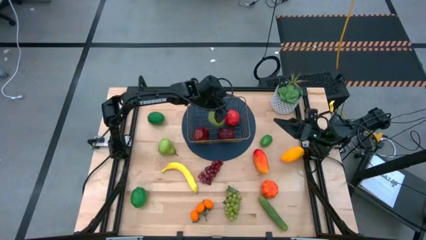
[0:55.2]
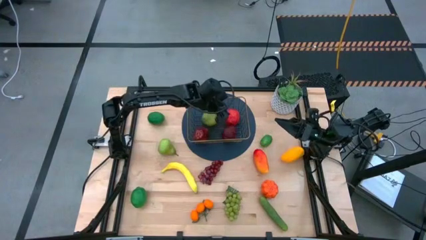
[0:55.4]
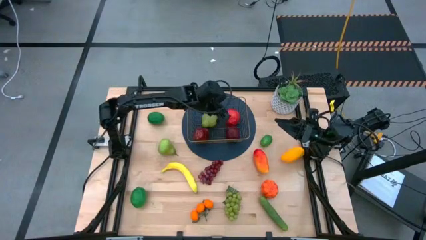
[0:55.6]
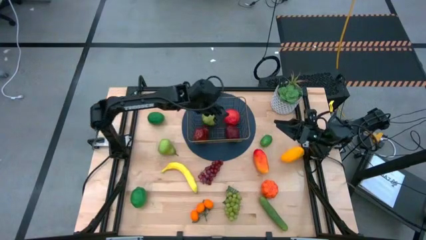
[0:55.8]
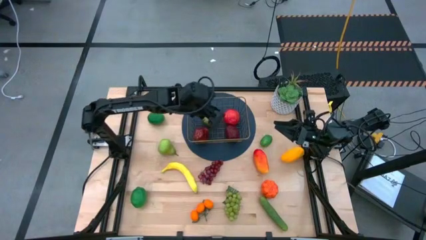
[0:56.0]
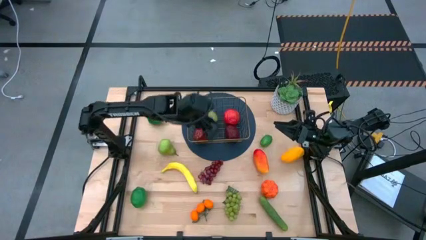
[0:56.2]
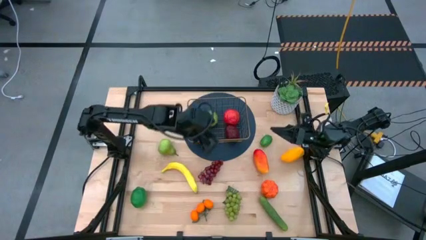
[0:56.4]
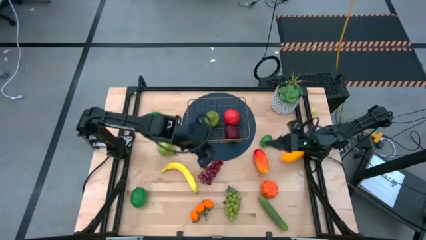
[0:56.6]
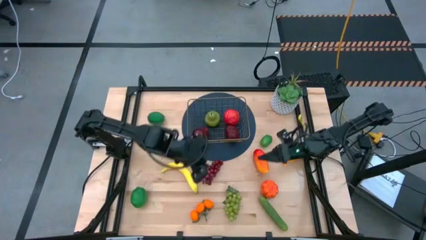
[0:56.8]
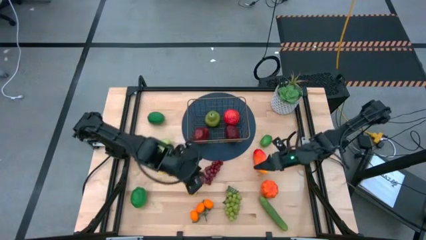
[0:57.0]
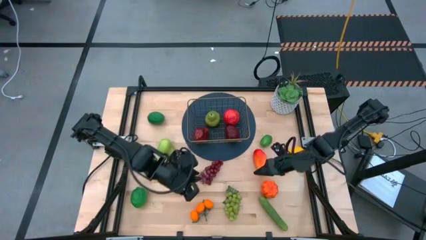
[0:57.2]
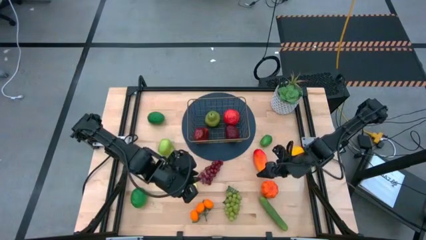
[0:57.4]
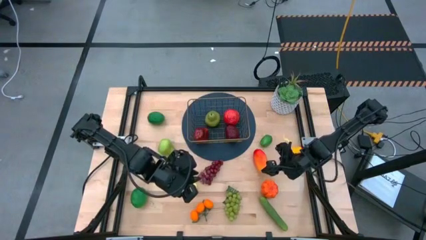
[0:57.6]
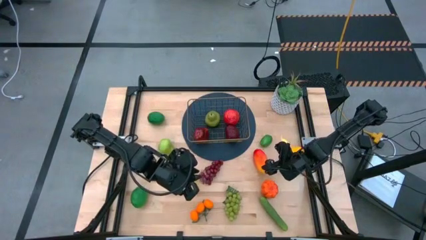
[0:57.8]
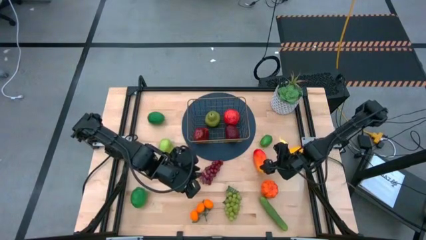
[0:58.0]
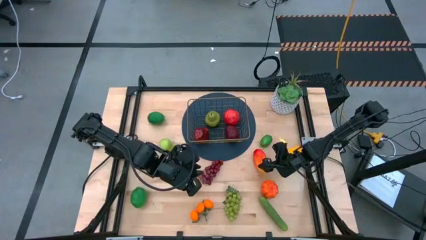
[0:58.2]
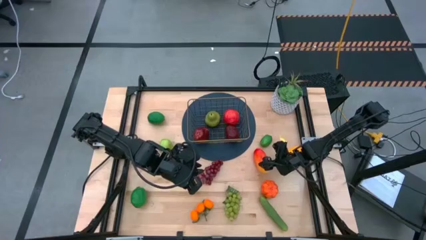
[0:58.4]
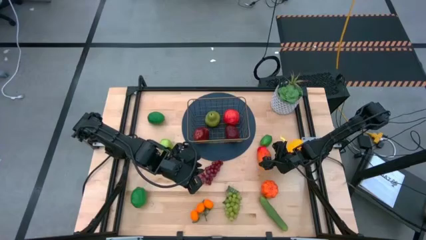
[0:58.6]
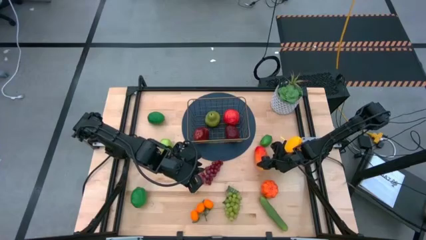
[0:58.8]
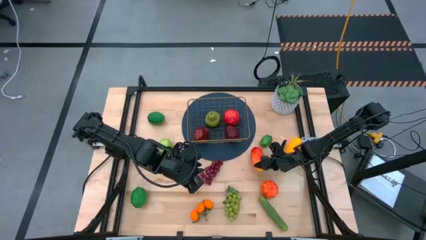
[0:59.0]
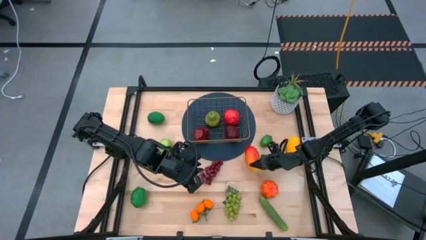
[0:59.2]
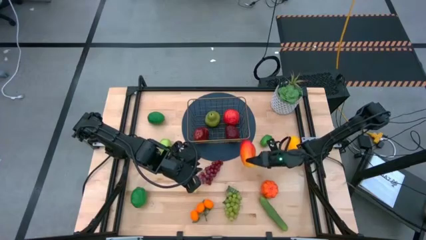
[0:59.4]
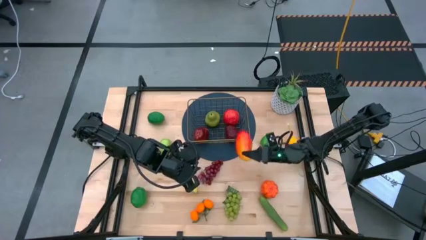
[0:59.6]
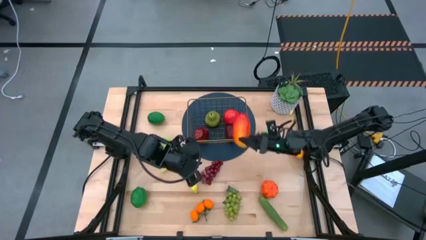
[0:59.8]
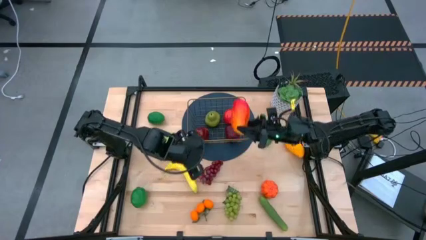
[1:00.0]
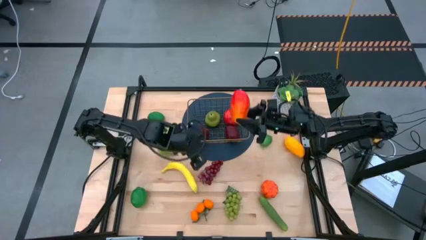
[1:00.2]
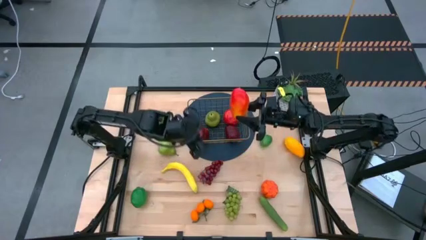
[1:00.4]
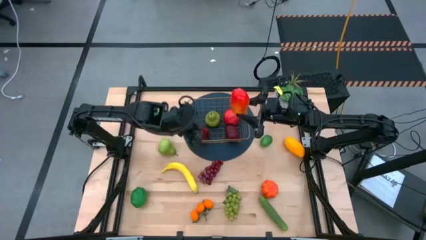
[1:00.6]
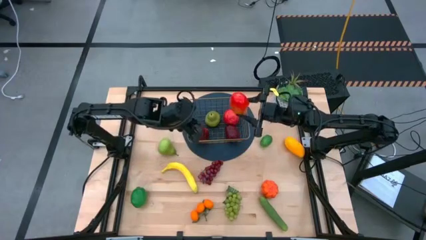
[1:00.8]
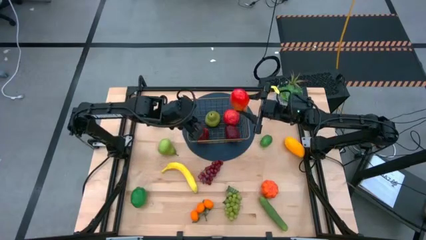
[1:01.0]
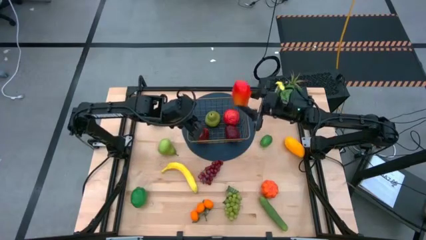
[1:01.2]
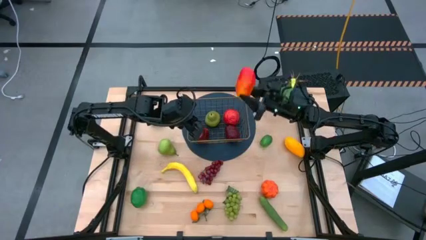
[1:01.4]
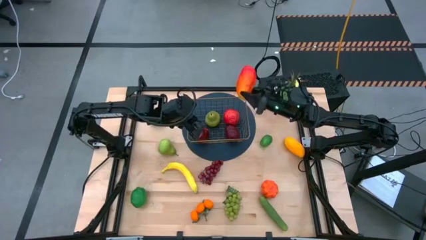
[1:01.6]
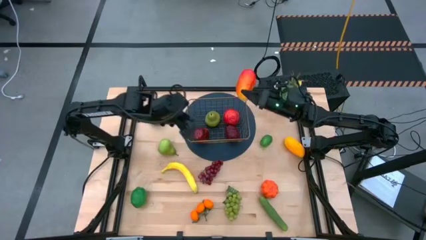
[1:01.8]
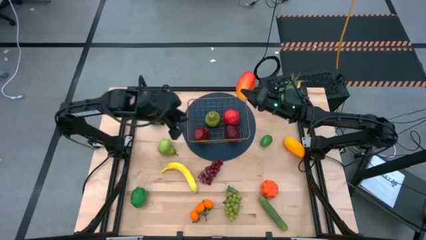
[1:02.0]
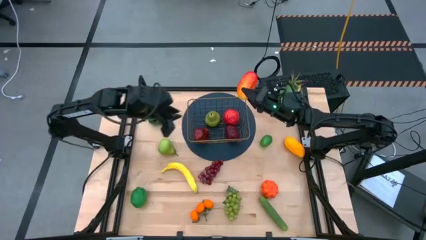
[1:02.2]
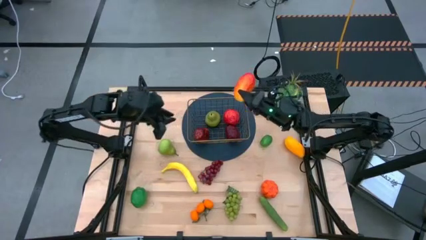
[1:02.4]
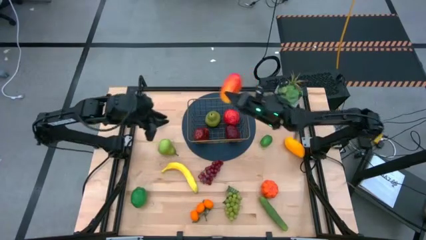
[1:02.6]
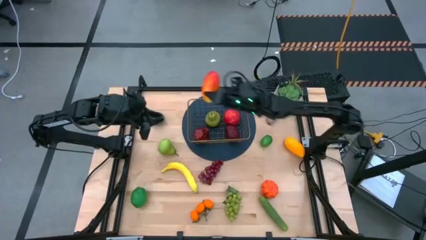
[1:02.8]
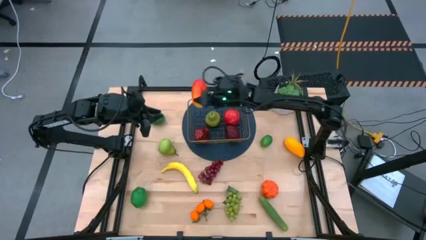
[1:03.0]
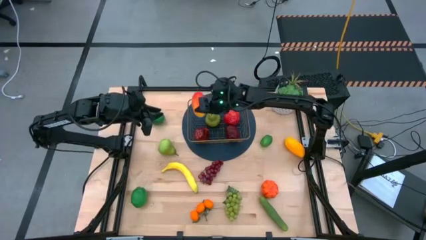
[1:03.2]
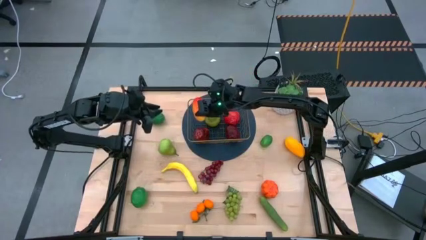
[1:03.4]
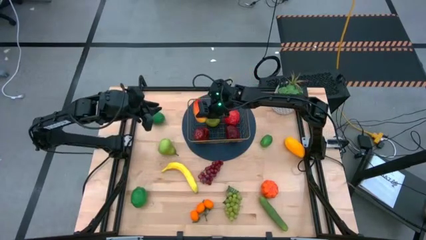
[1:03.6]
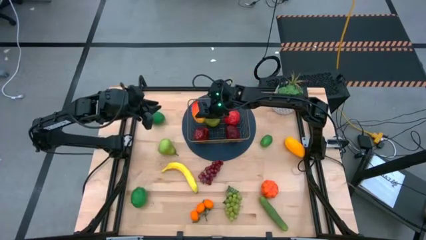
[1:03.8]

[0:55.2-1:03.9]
Task: Build produce basket
Put the orange mango into the wire basket

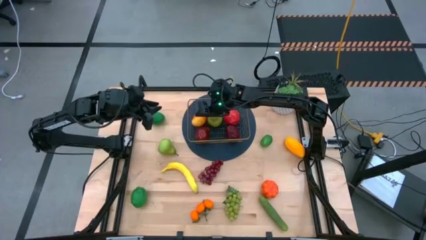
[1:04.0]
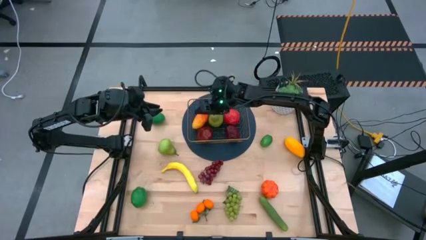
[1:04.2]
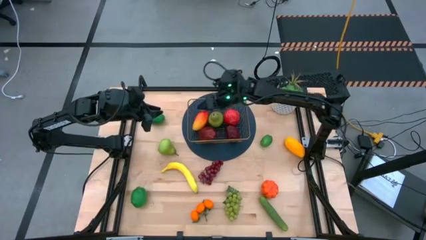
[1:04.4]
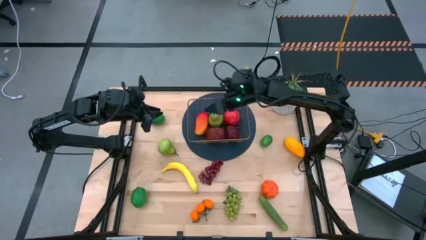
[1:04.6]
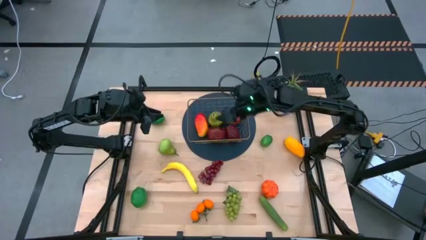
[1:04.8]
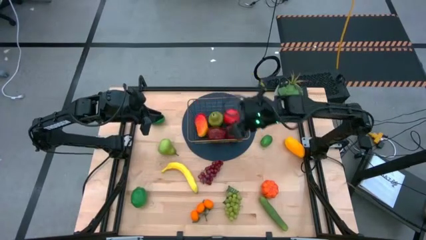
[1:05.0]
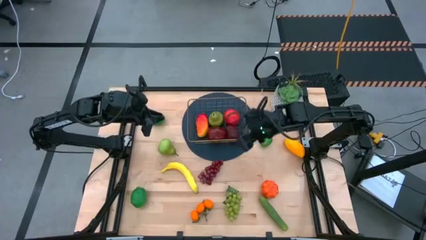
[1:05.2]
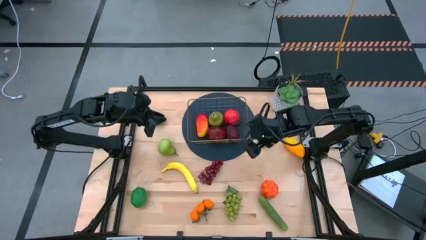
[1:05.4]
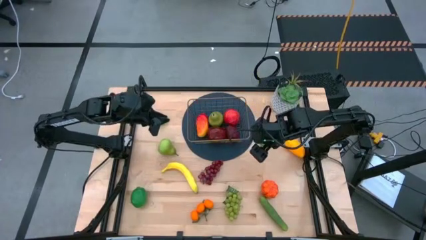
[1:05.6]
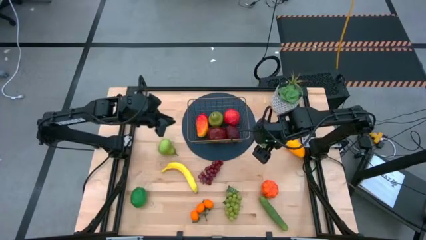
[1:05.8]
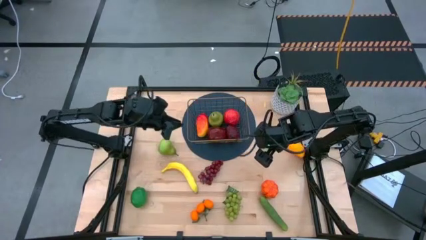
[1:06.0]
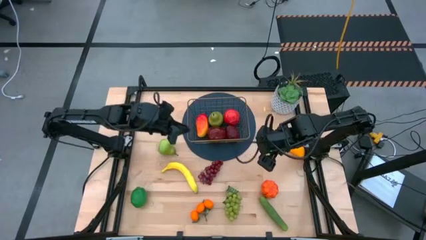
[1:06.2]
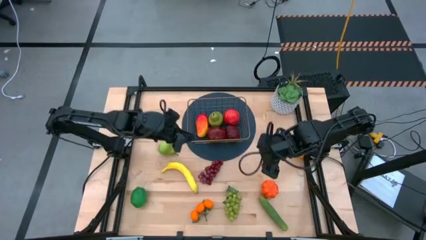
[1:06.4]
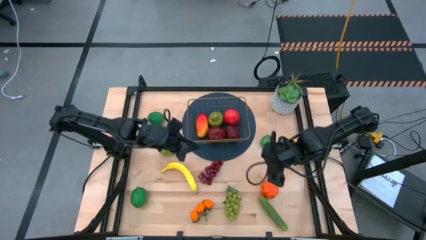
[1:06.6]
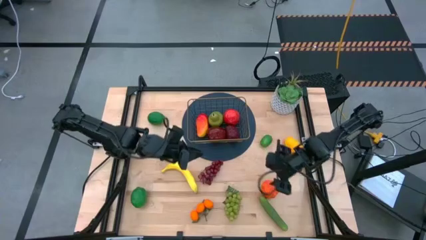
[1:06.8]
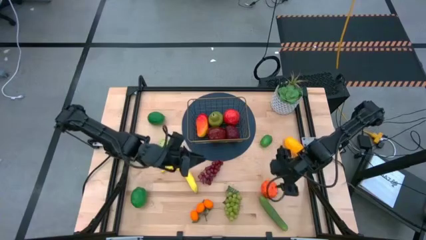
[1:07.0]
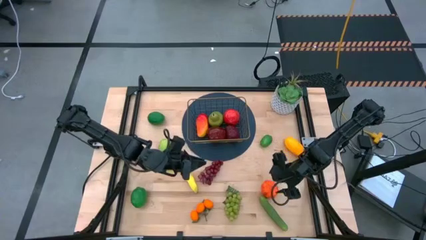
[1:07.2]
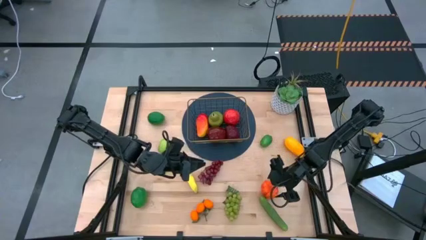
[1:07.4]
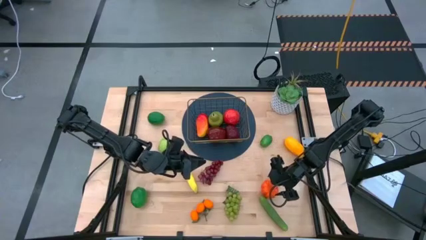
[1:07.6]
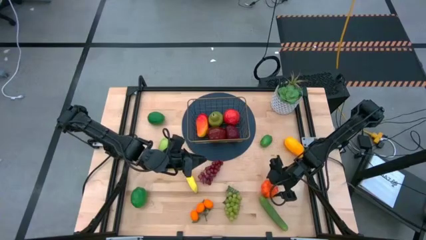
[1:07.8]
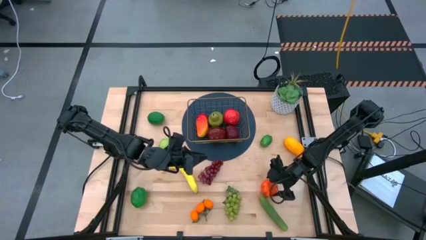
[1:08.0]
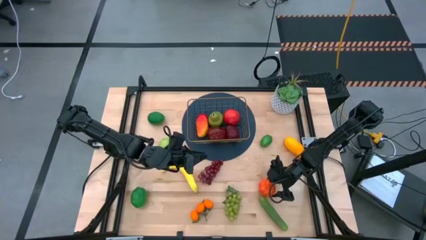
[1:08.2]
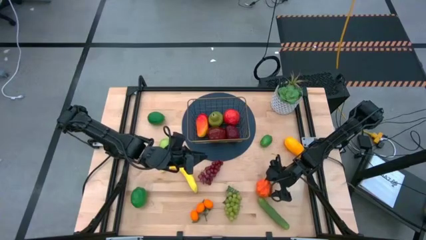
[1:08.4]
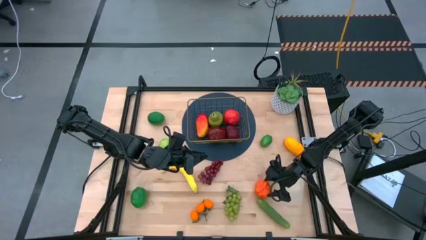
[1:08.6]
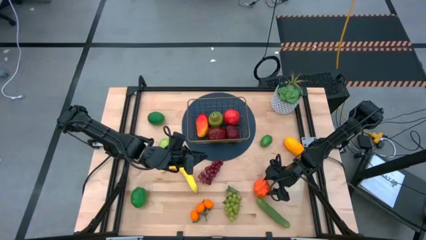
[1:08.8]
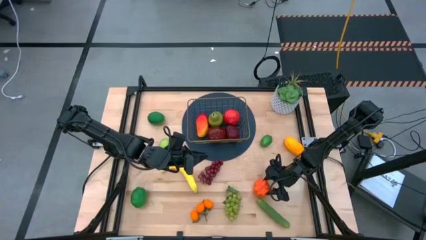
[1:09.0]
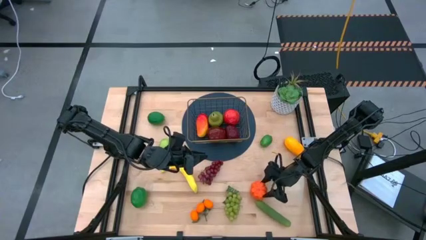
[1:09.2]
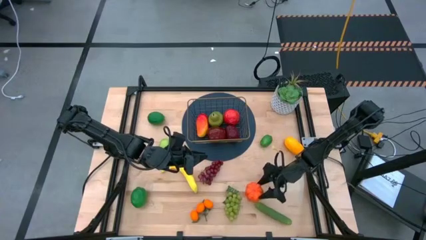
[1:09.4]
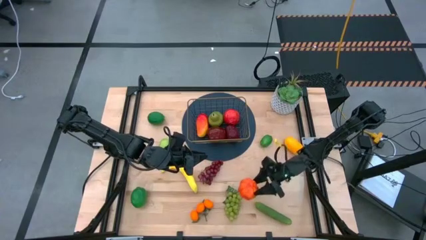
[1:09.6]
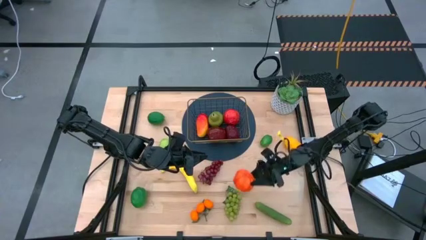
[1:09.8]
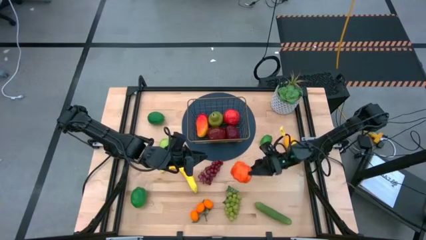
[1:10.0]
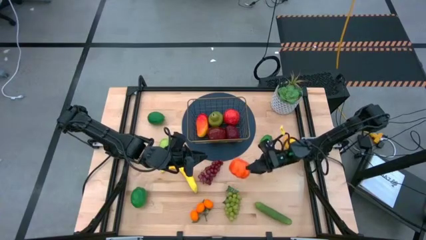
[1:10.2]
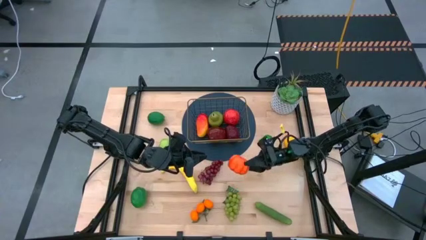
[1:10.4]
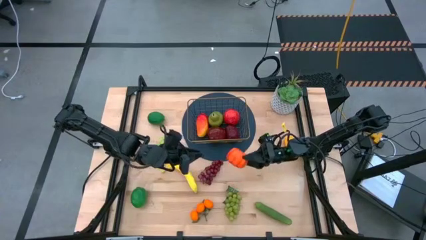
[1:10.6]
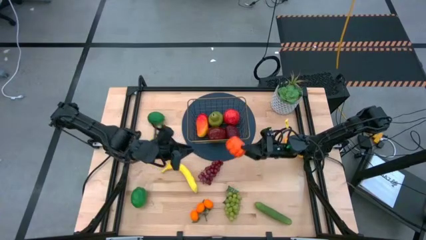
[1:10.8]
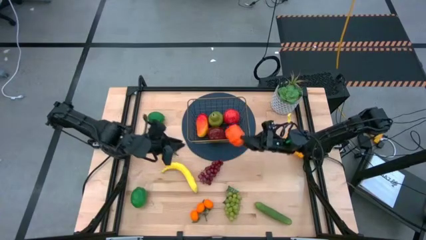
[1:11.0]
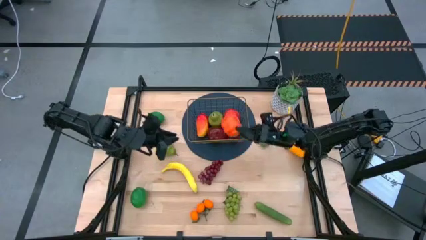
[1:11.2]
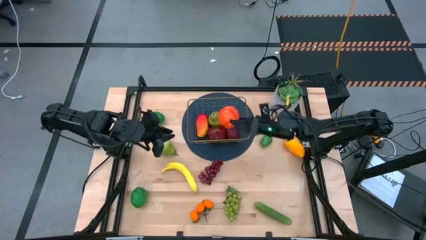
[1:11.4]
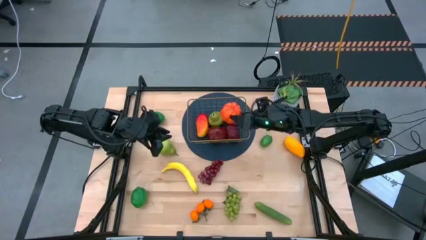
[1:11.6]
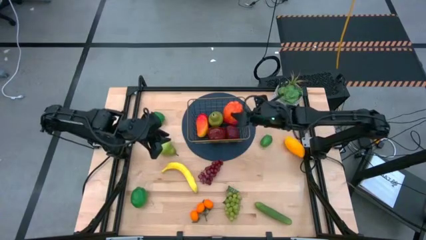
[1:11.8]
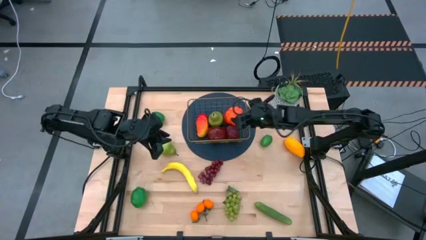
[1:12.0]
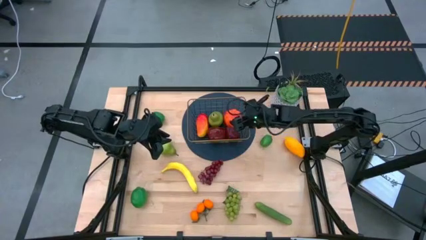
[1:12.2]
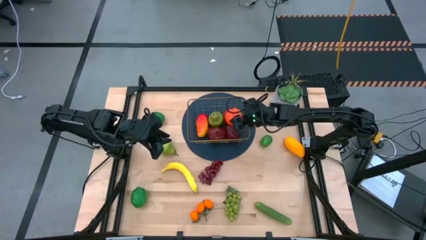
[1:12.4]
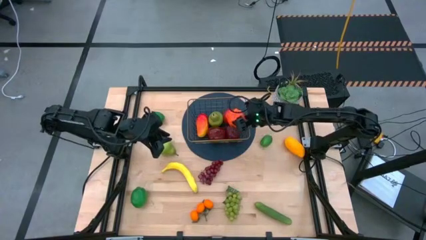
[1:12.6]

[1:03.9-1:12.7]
Put the orange pumpkin into the wire basket
